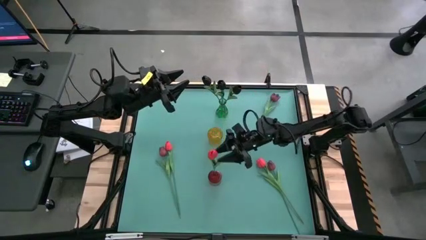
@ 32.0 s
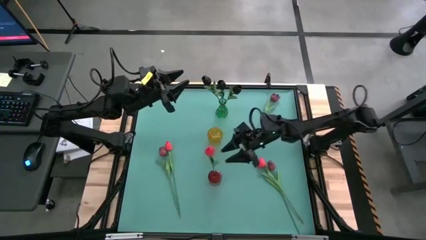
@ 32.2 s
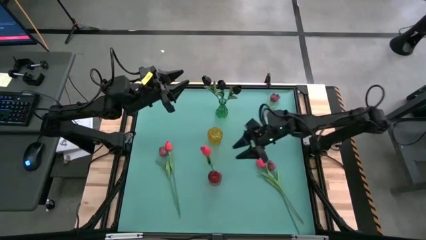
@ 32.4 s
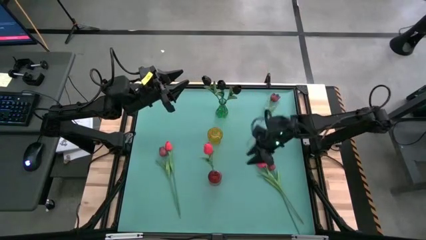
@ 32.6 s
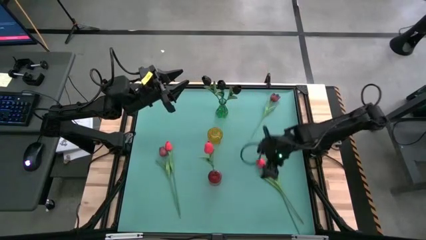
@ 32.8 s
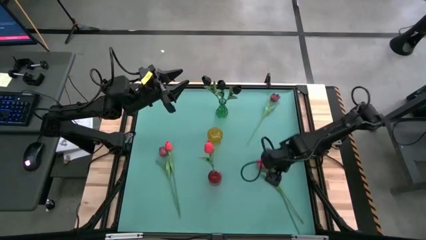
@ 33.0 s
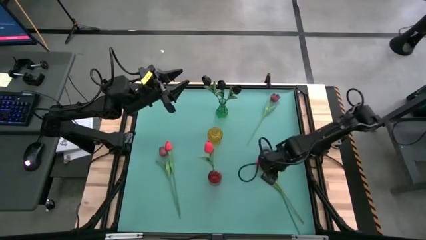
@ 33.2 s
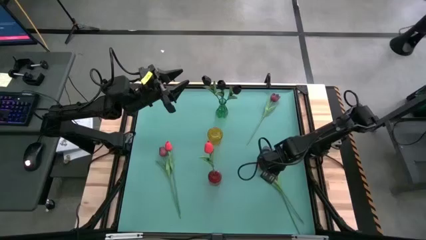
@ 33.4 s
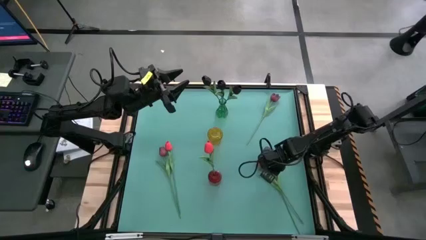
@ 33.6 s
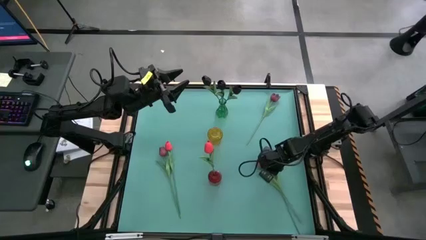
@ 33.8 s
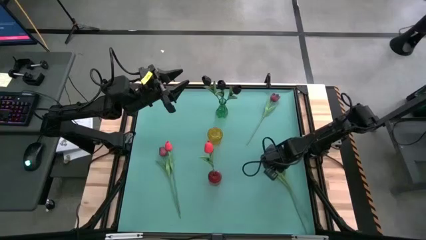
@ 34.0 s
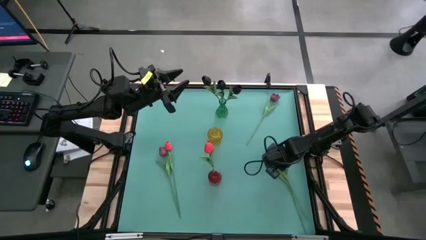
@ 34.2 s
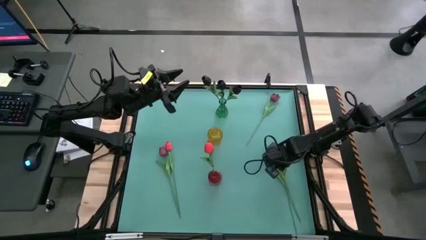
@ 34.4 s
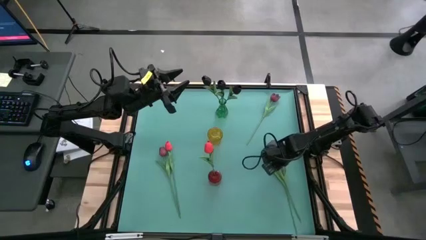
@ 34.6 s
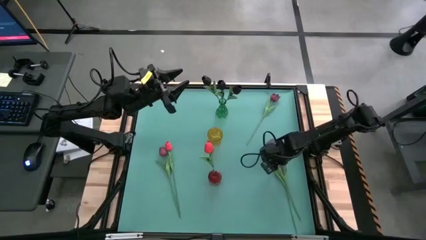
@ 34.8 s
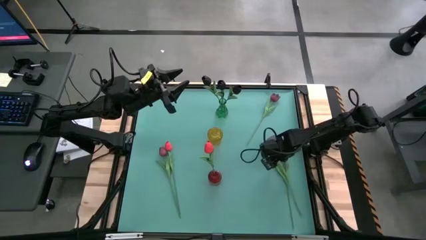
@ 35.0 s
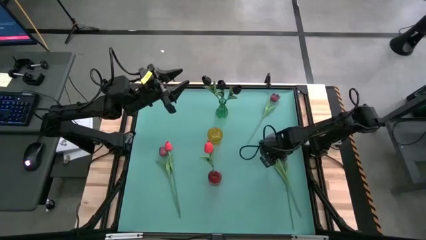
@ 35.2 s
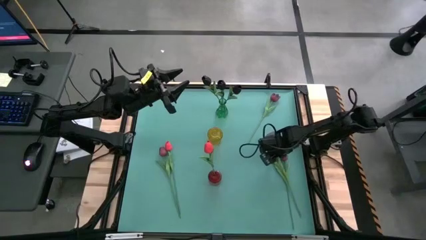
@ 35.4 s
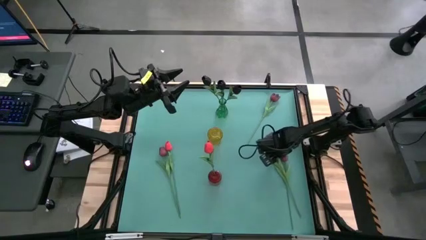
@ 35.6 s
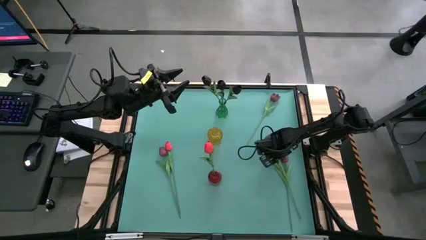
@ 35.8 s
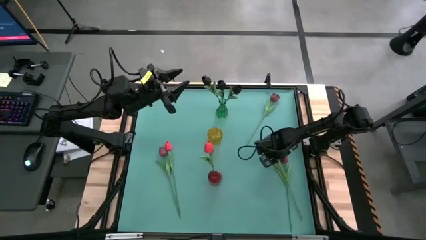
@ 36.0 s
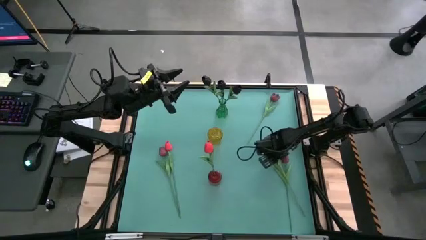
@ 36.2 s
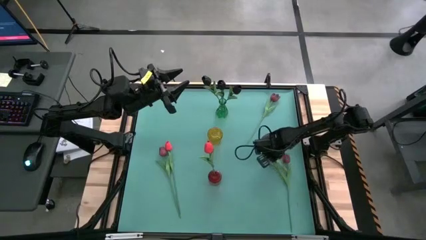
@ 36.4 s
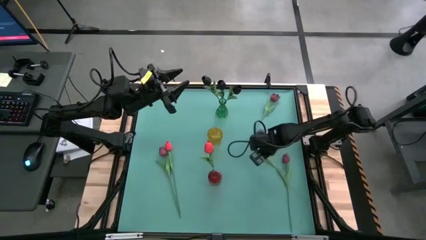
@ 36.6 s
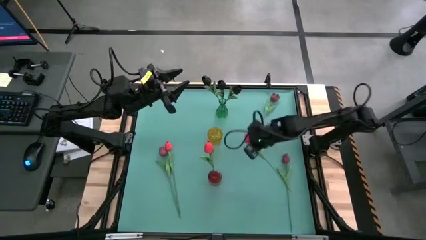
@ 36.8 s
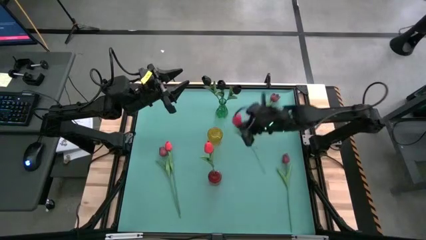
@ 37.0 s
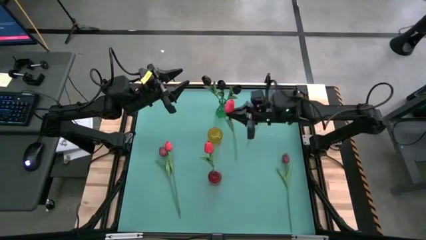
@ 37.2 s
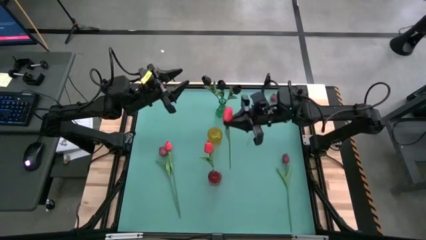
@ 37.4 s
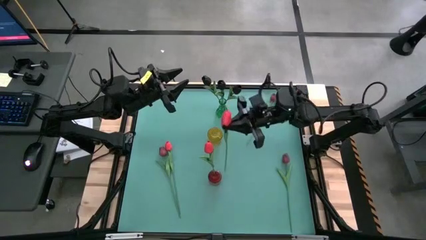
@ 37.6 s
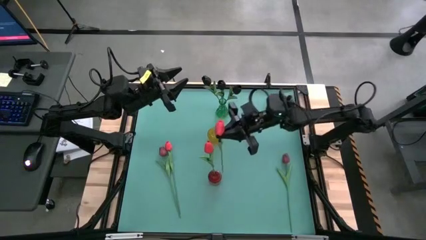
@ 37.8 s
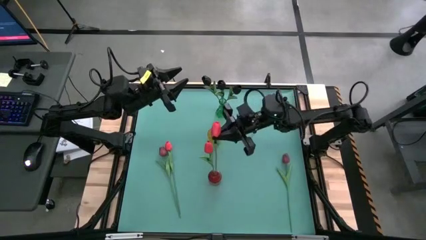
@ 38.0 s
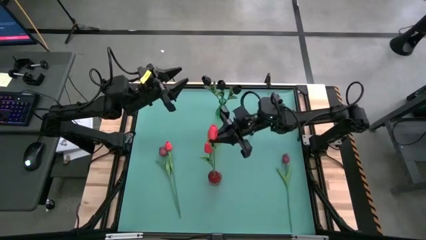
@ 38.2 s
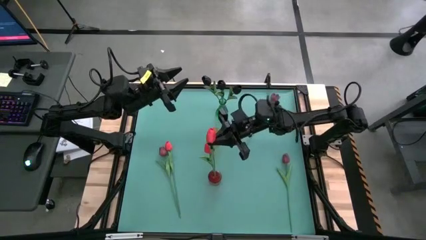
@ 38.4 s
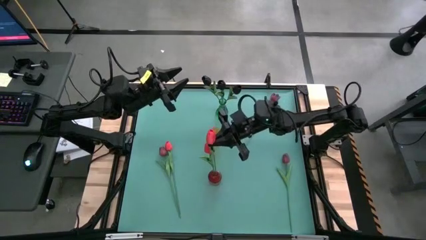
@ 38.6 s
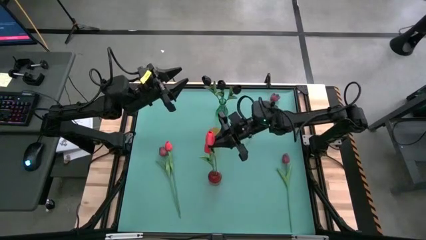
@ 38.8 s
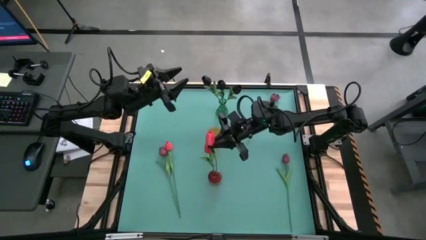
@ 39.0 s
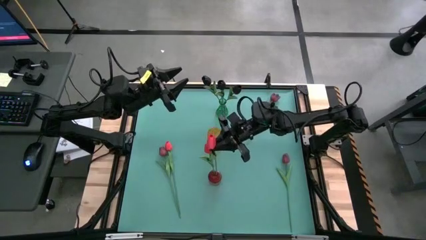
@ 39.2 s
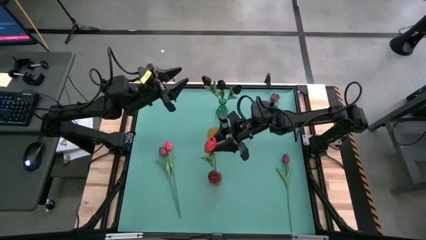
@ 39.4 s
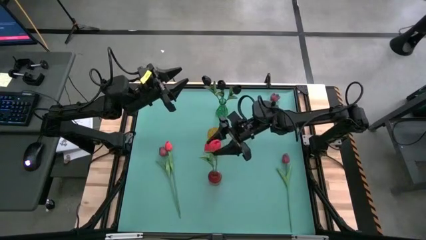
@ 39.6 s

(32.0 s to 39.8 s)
Task: Sort flowers into vase by color
Put the right red tulip into the red vase

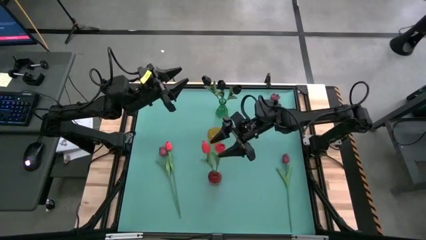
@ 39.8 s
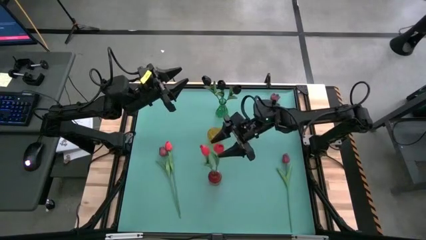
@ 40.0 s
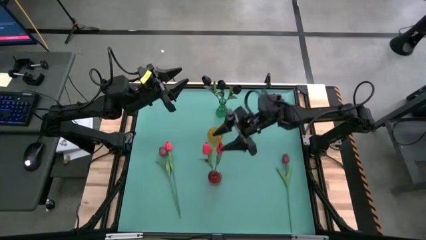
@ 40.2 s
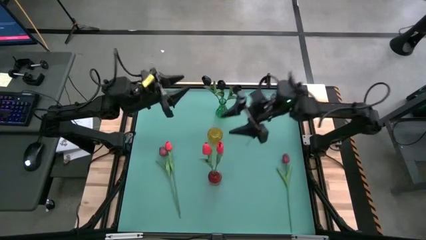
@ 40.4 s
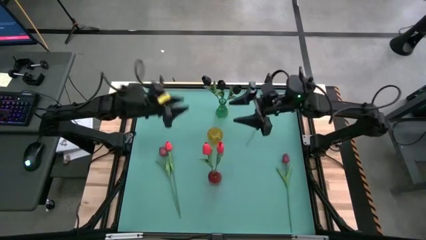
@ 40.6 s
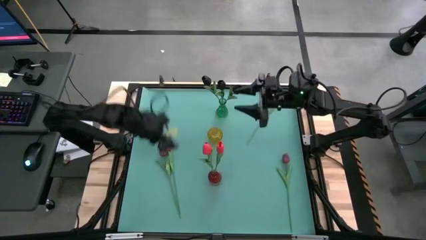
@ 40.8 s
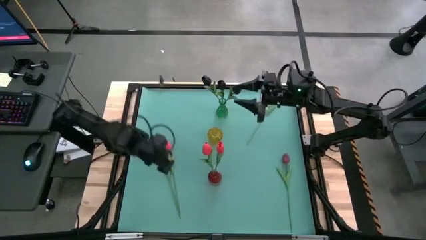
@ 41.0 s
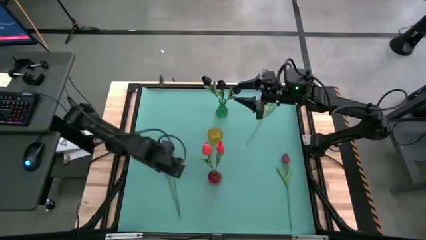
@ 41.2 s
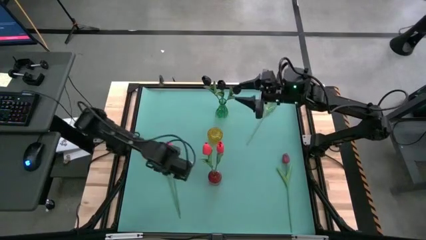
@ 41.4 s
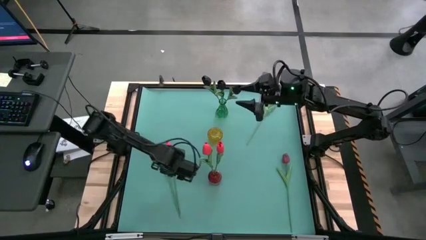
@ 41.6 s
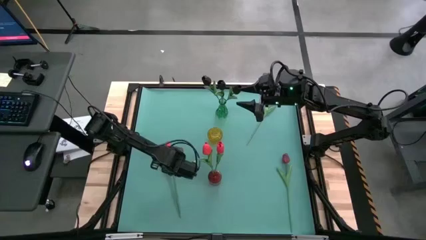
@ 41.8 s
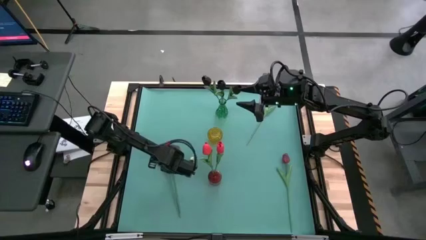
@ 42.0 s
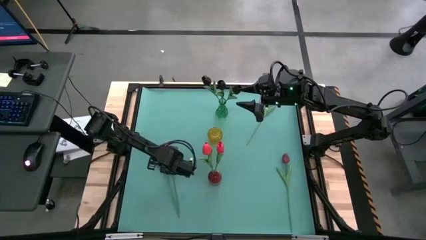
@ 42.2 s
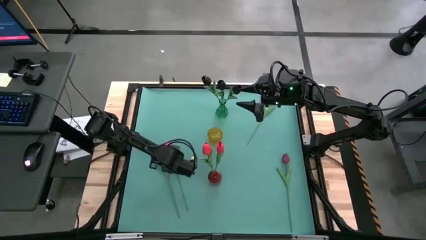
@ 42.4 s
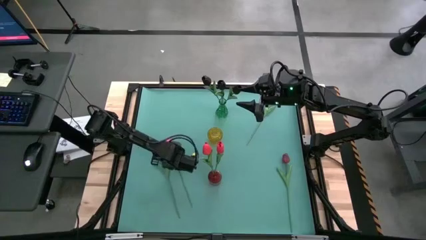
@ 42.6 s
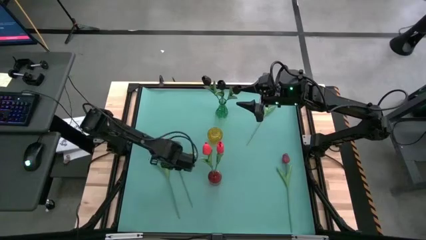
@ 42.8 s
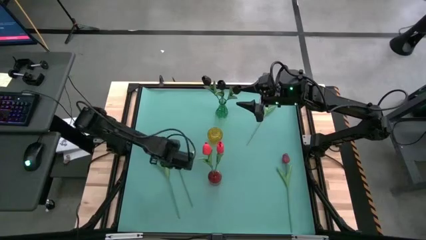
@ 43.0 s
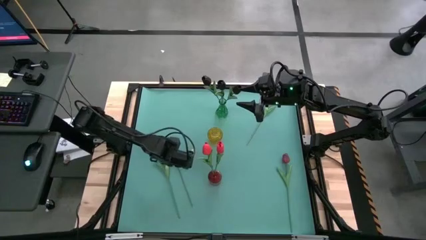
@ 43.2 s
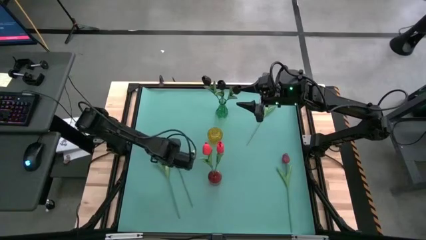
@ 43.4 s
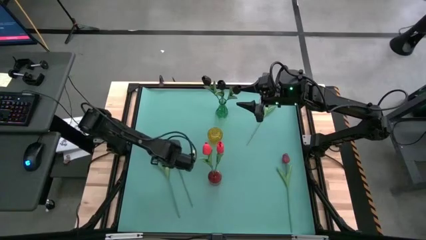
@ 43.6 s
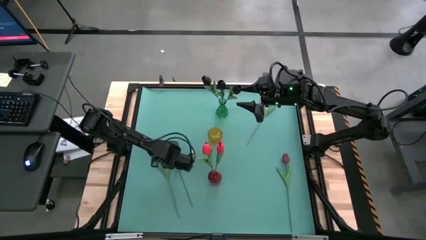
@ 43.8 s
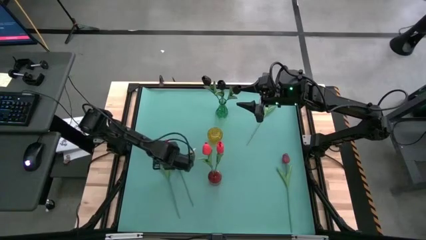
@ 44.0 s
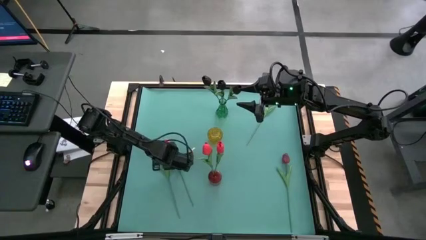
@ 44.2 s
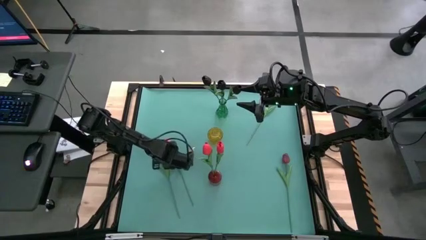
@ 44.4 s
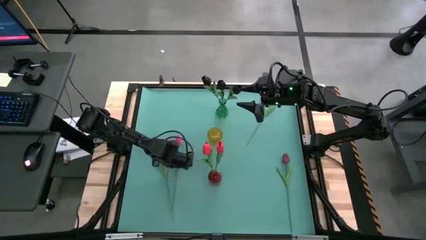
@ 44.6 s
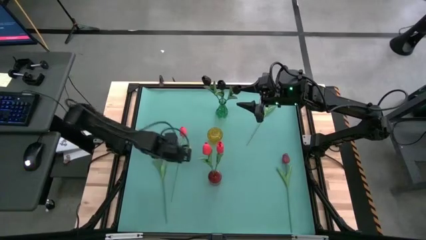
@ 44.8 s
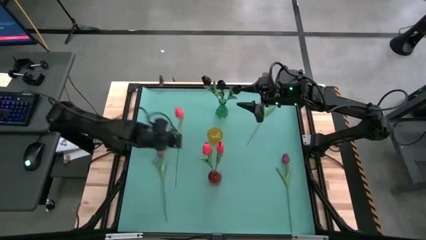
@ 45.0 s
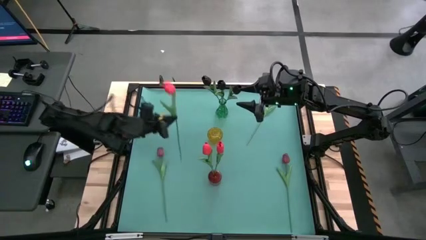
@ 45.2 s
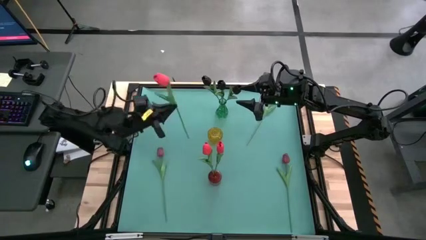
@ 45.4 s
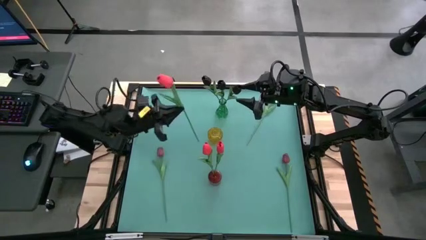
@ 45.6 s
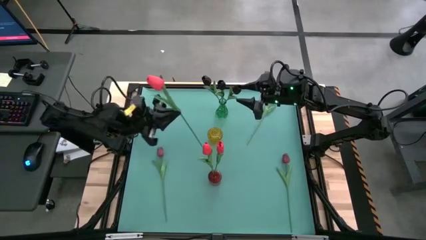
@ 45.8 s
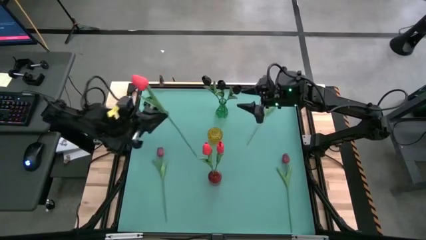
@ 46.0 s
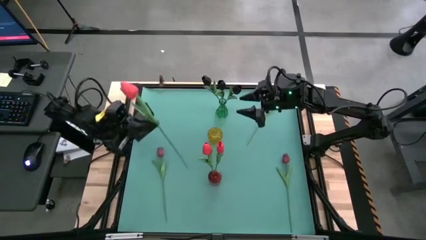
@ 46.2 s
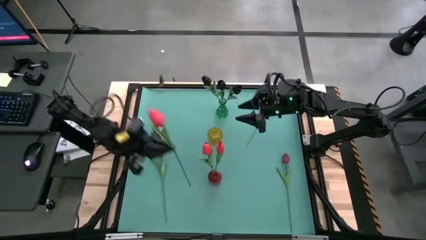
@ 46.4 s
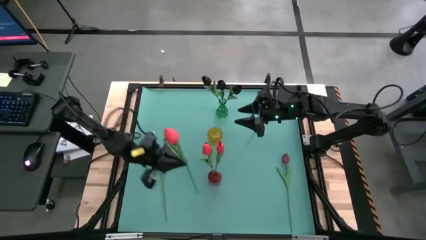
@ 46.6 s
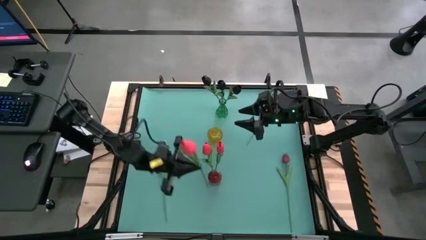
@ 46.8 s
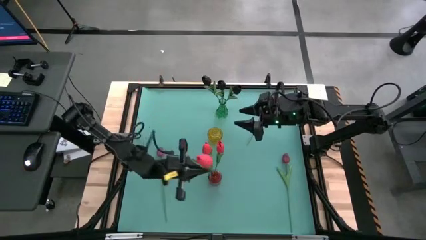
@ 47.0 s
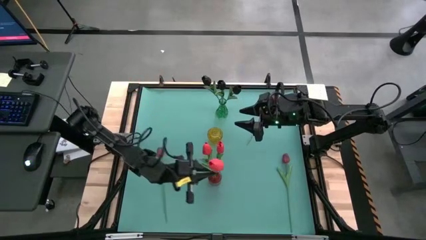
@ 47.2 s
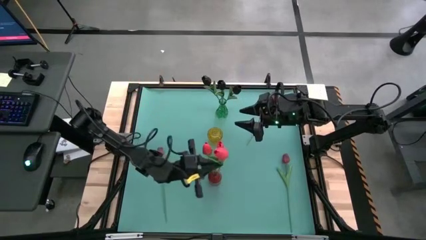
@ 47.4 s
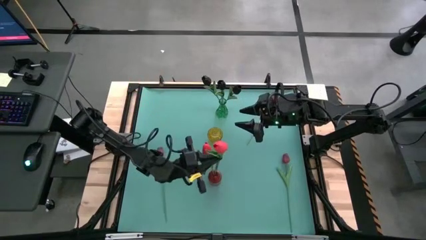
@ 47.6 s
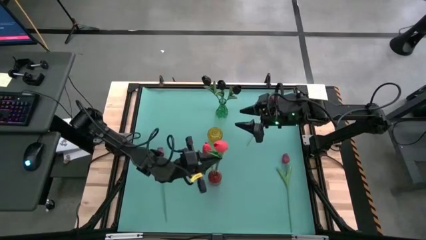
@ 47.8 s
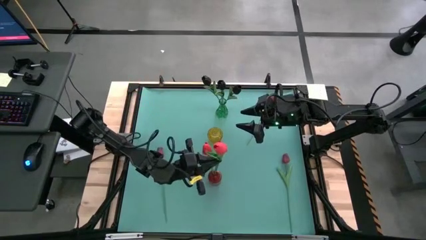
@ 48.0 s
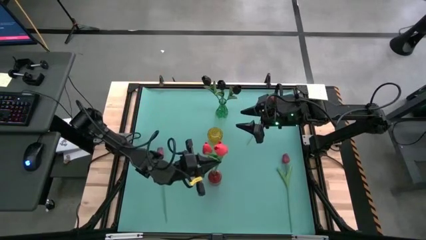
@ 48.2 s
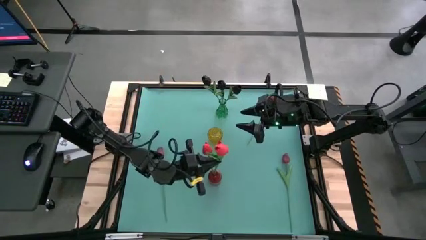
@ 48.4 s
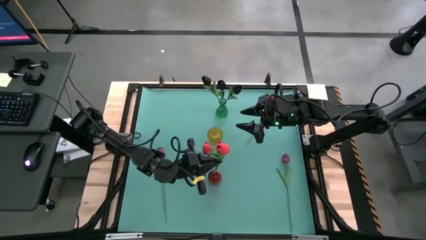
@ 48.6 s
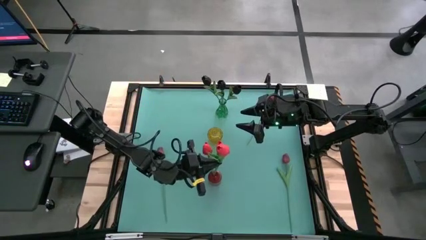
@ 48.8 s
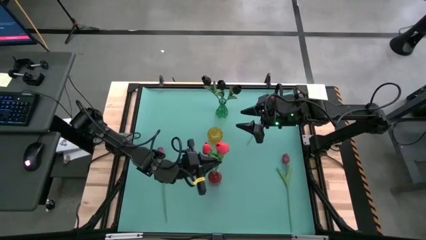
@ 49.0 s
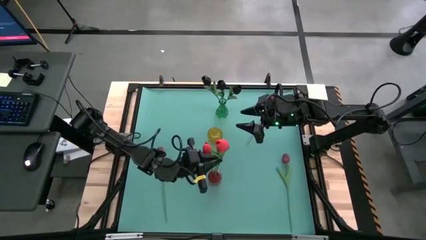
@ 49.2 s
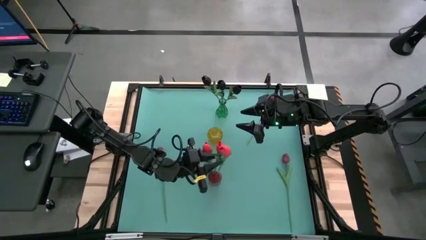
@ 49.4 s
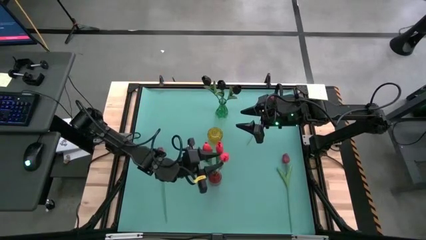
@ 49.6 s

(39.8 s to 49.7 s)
Put the red tulip into the red vase
